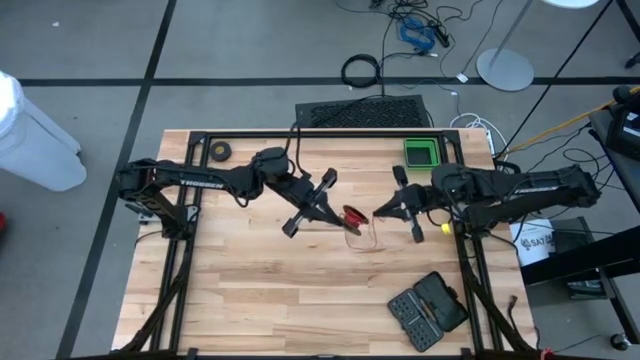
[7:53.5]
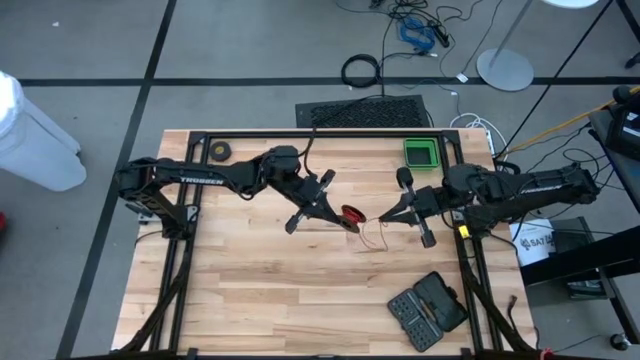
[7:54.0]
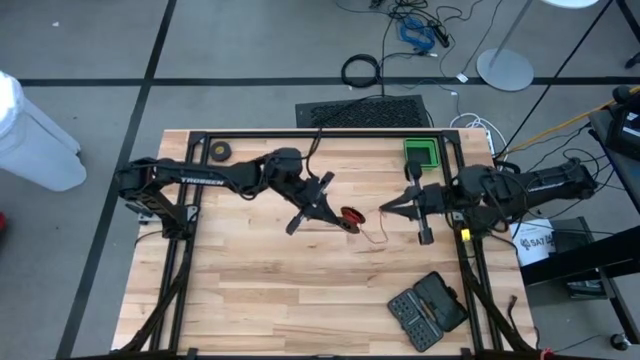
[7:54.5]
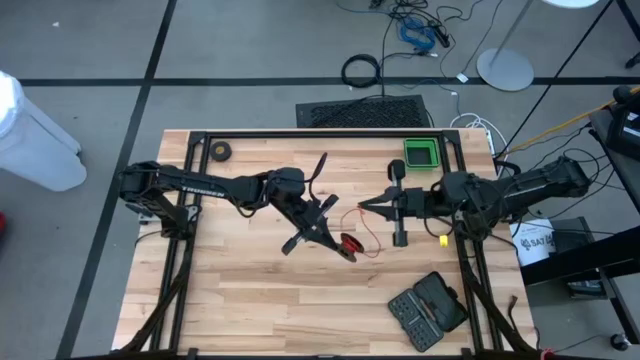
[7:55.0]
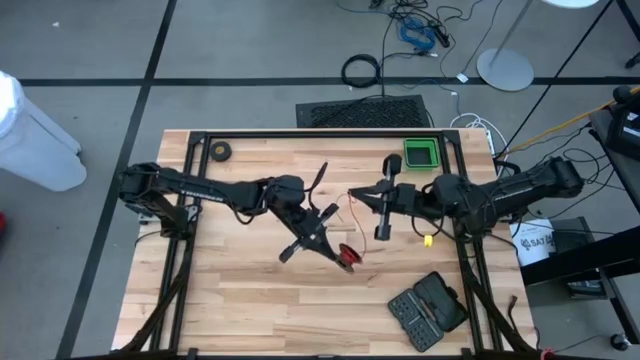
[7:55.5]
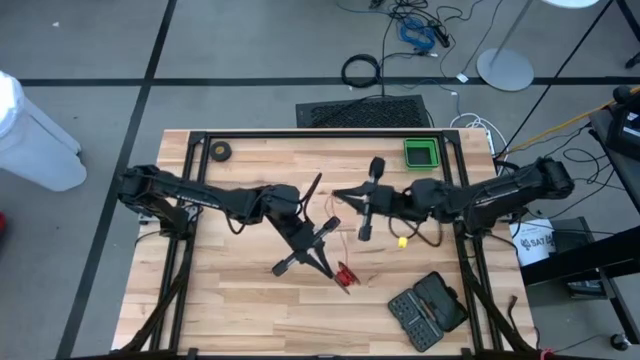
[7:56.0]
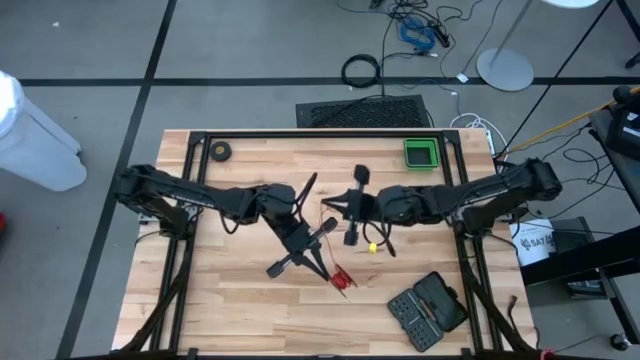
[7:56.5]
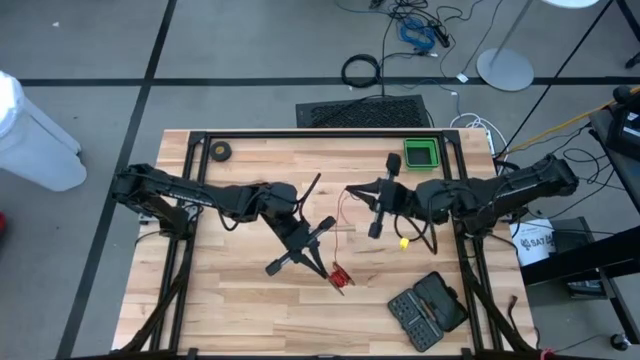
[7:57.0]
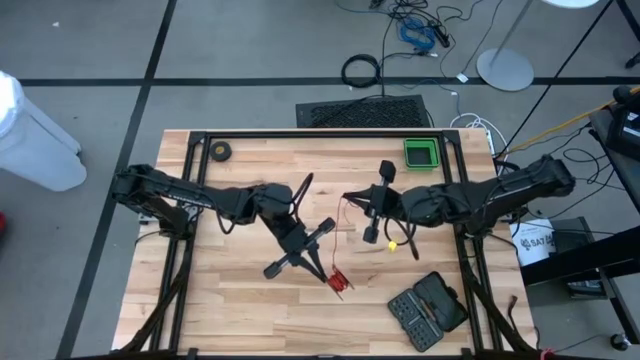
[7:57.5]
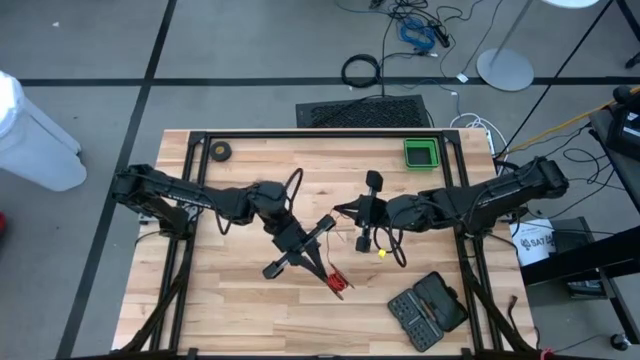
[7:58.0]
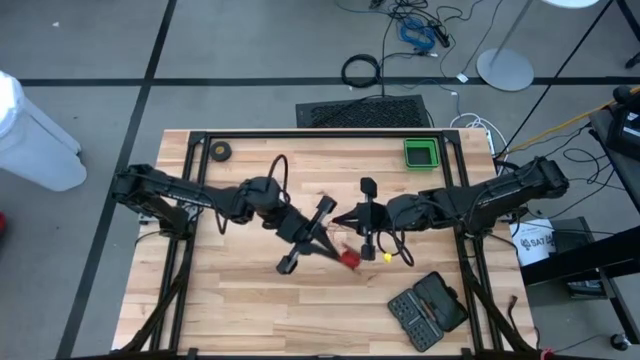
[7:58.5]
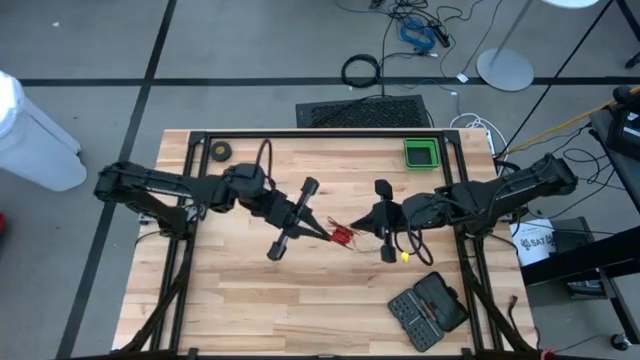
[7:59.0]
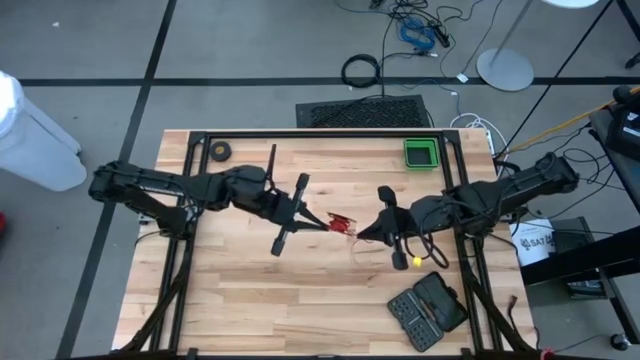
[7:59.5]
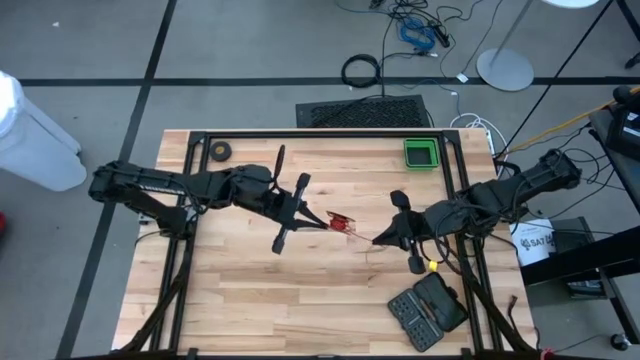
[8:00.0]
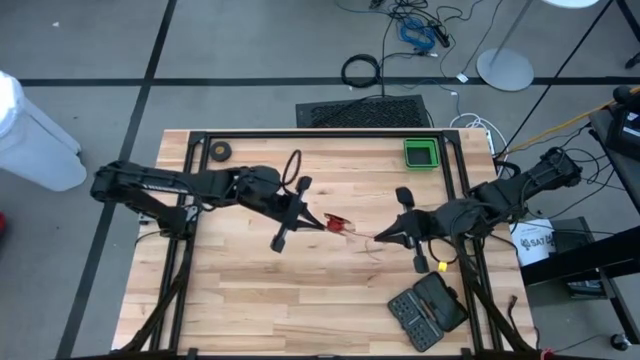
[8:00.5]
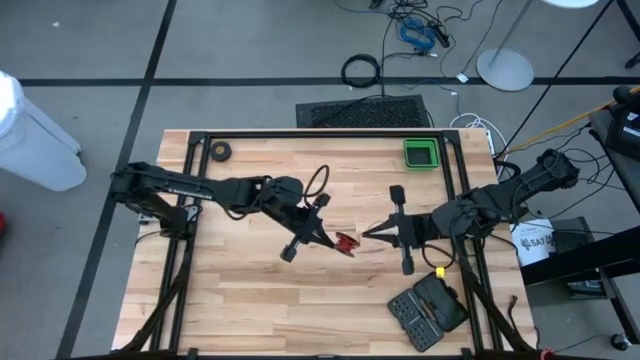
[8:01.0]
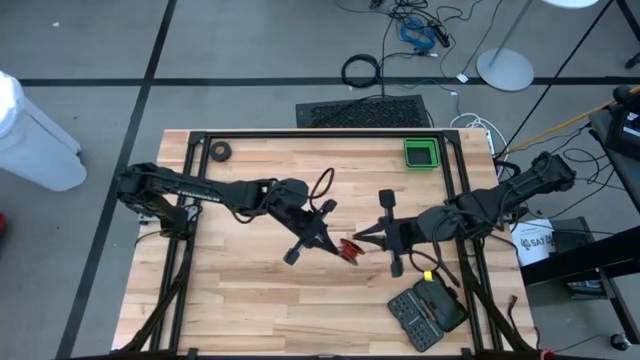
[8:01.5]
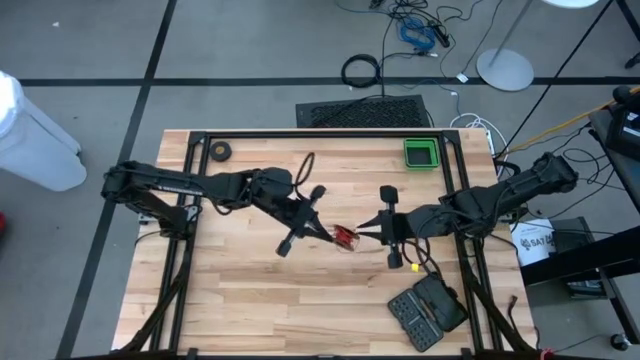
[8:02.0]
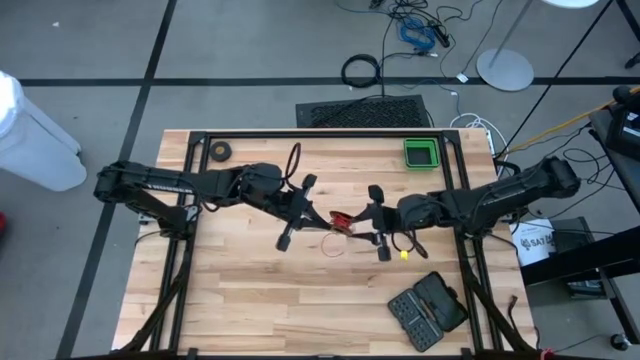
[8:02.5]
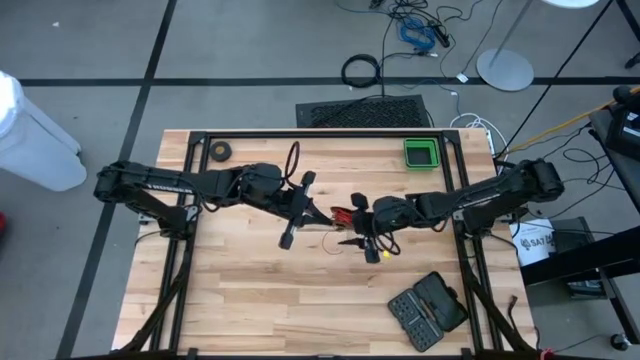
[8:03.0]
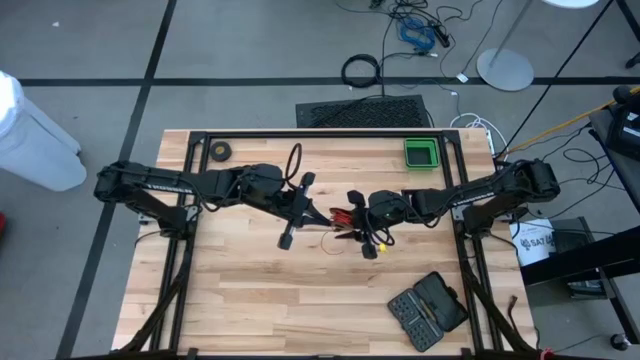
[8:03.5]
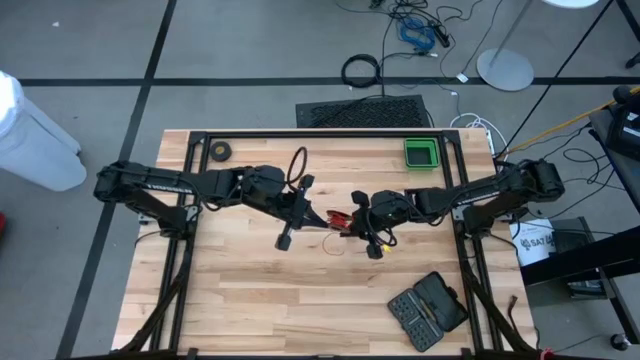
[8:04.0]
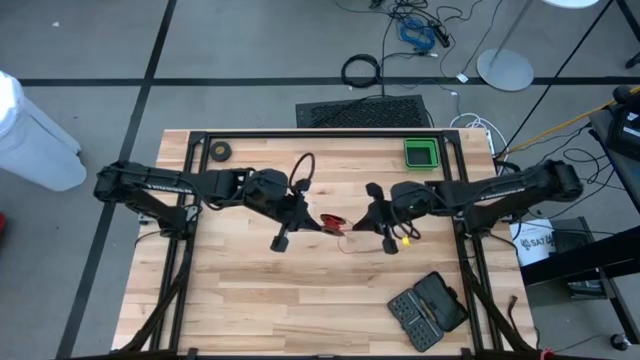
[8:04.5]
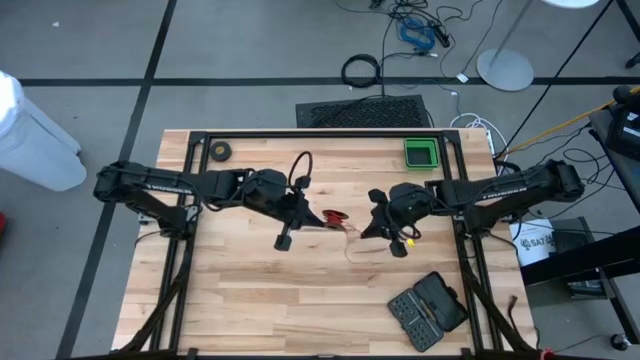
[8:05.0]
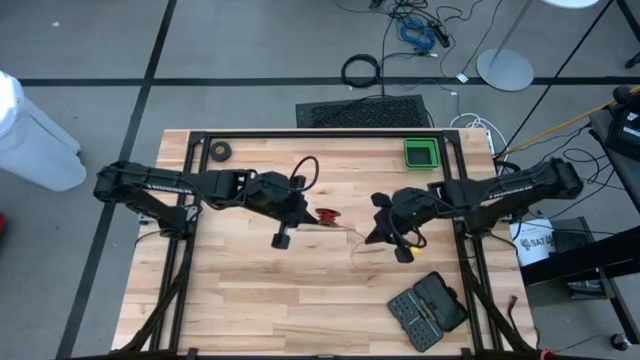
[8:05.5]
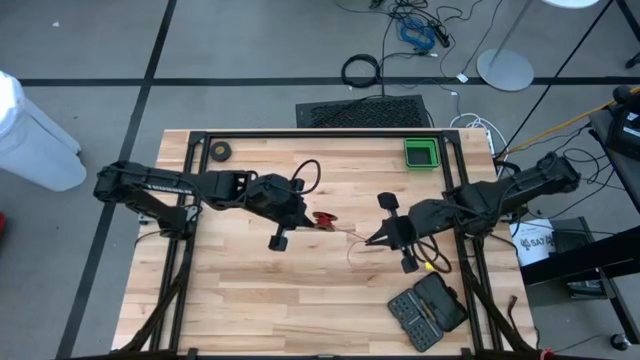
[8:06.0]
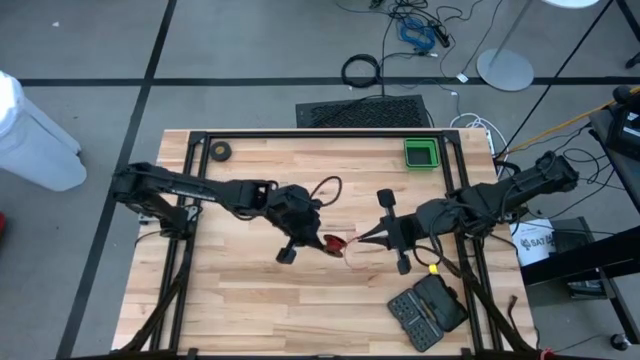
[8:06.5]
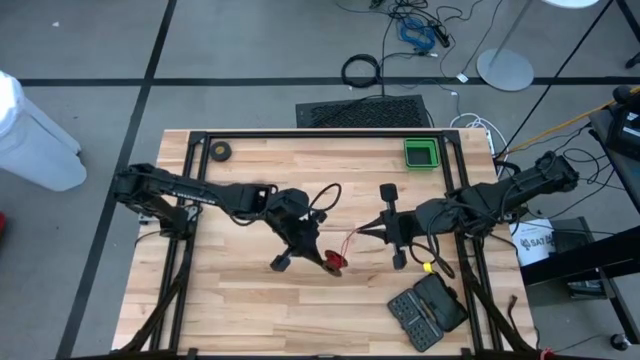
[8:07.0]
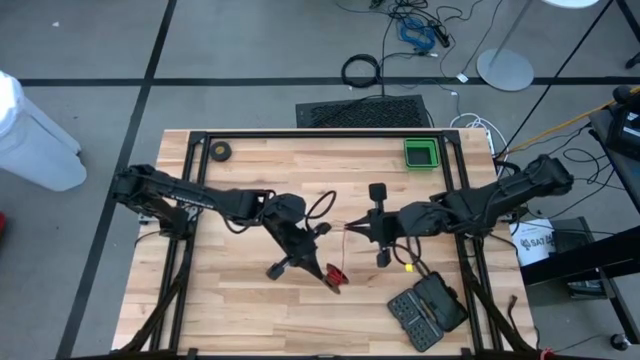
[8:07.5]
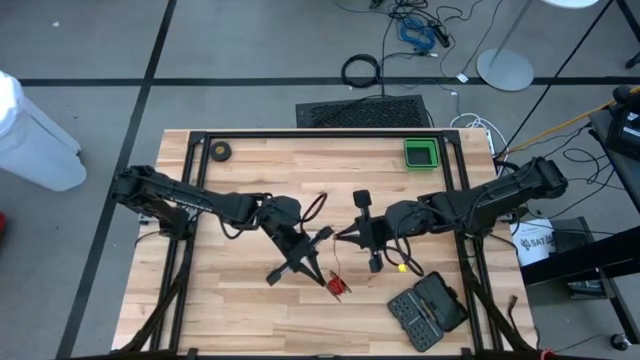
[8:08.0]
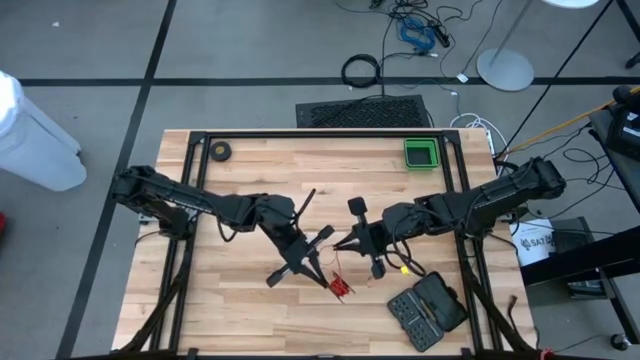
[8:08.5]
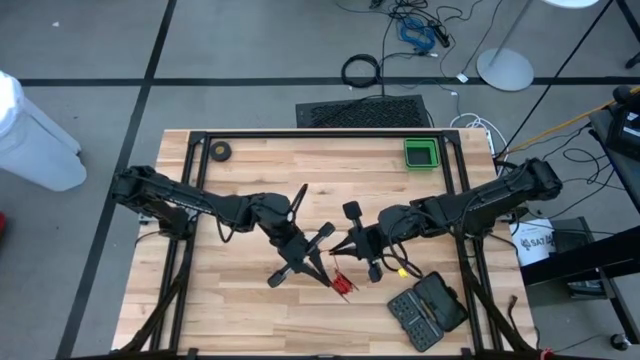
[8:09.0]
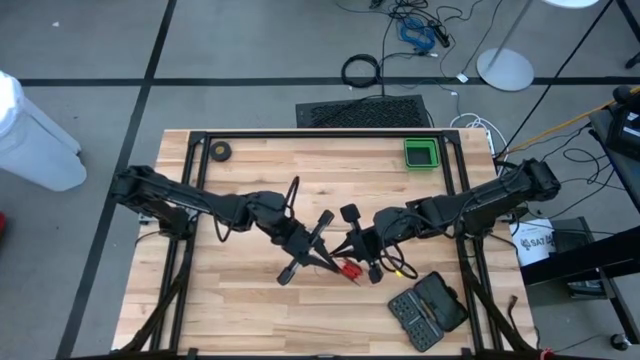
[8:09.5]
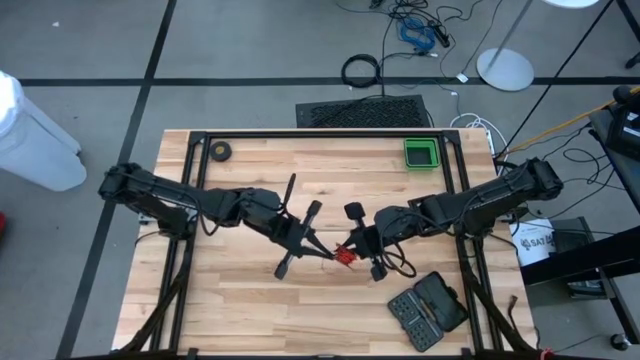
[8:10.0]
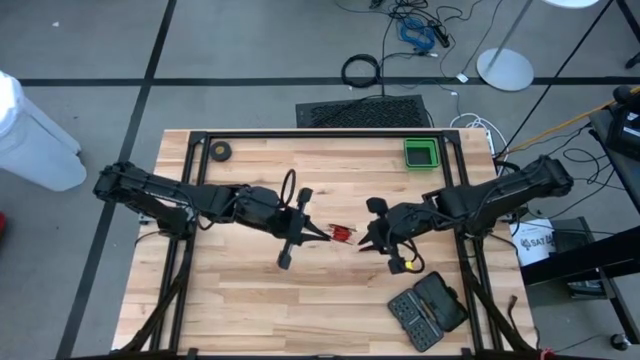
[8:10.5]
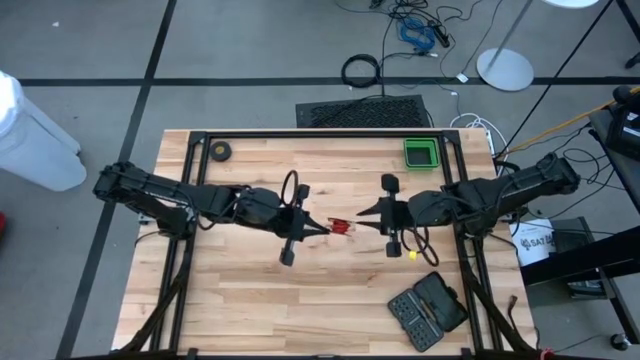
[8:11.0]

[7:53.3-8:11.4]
Task: Coil cords
Coil the red wire into the spool
